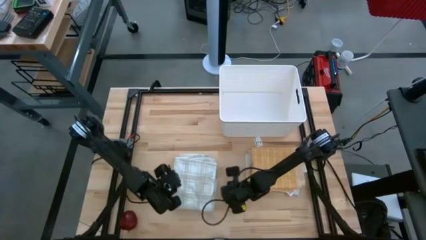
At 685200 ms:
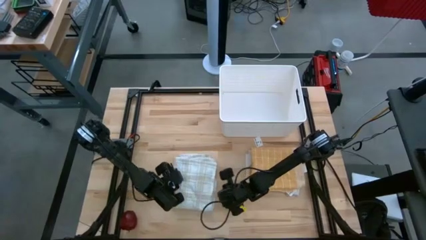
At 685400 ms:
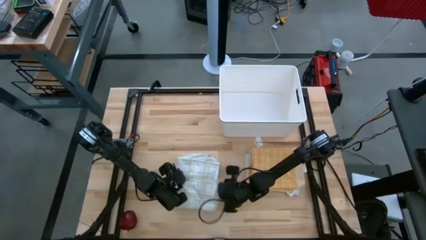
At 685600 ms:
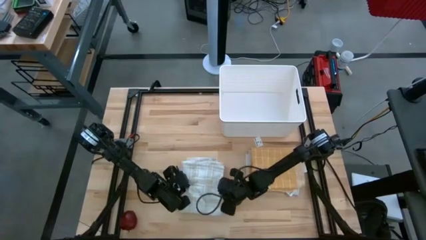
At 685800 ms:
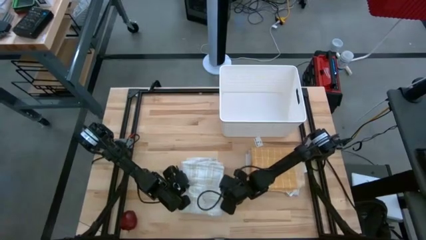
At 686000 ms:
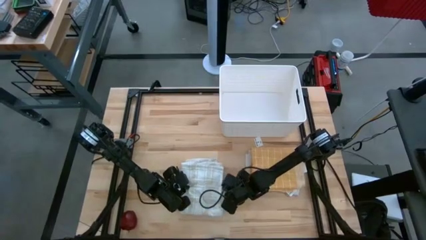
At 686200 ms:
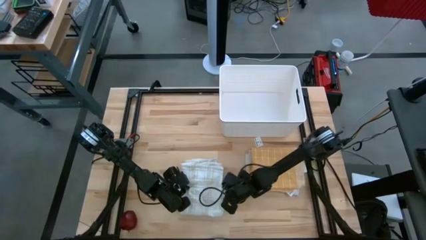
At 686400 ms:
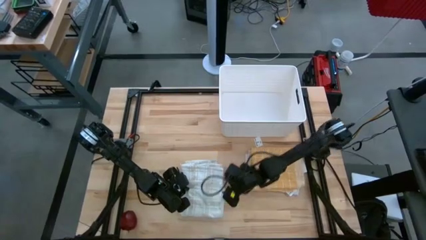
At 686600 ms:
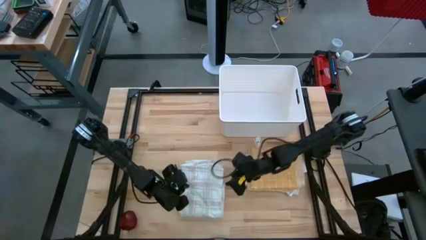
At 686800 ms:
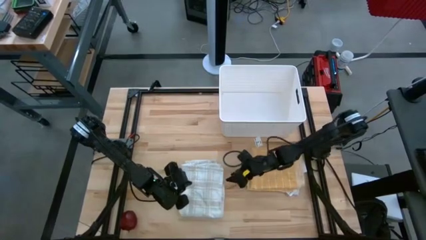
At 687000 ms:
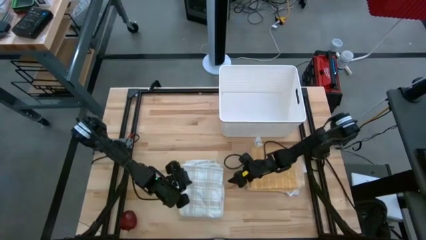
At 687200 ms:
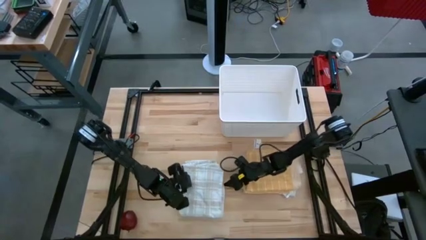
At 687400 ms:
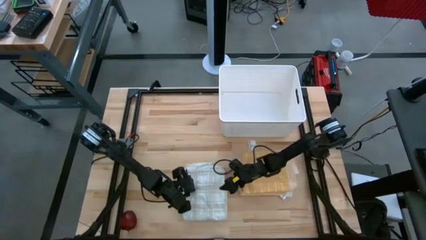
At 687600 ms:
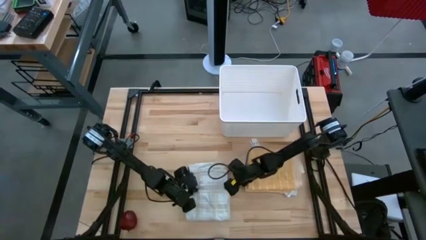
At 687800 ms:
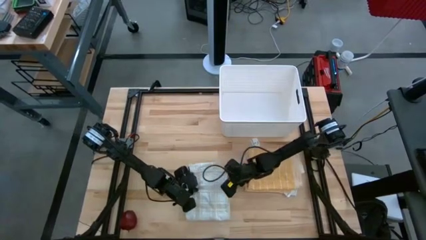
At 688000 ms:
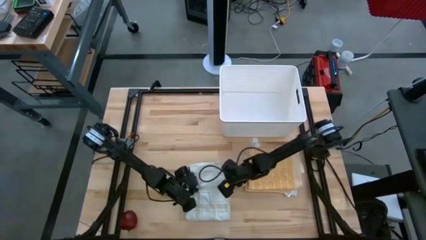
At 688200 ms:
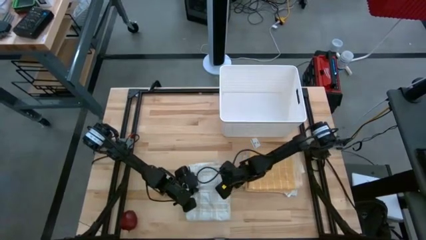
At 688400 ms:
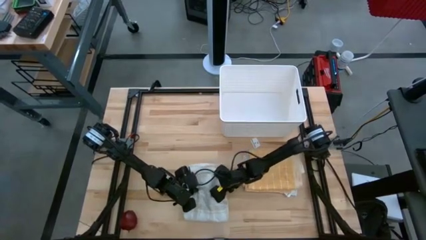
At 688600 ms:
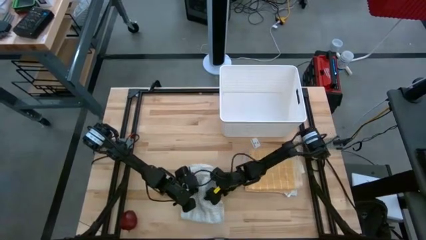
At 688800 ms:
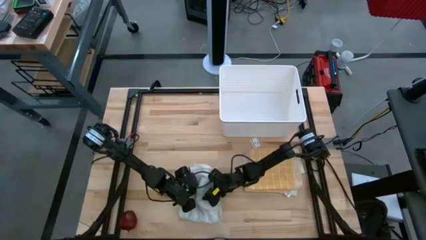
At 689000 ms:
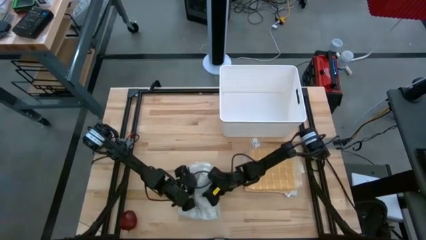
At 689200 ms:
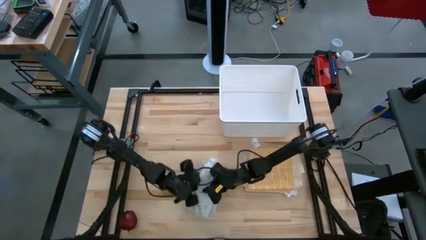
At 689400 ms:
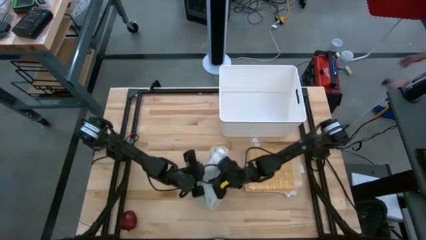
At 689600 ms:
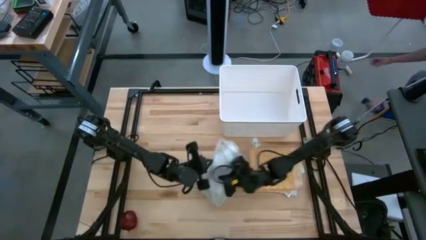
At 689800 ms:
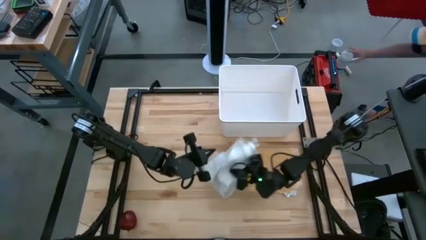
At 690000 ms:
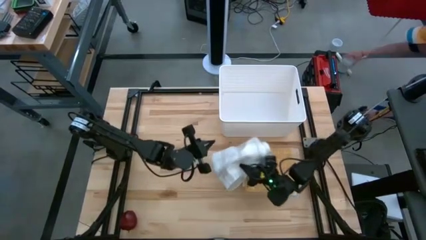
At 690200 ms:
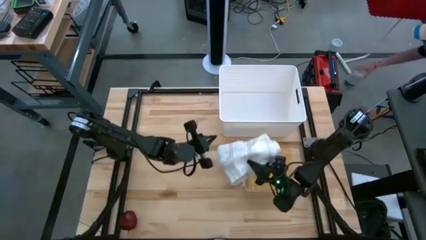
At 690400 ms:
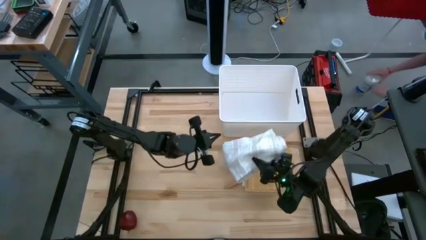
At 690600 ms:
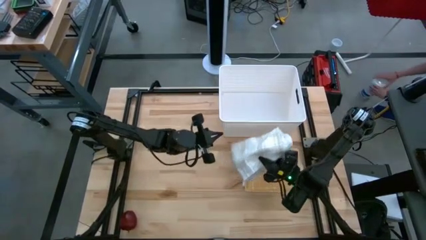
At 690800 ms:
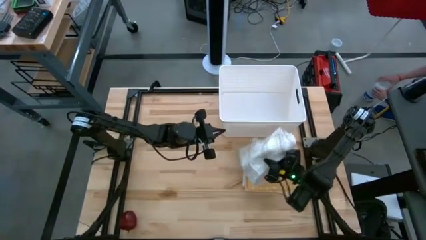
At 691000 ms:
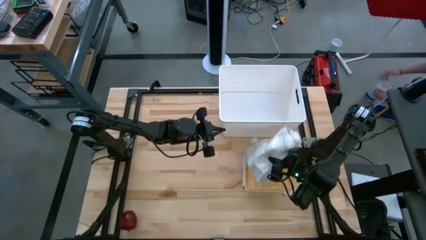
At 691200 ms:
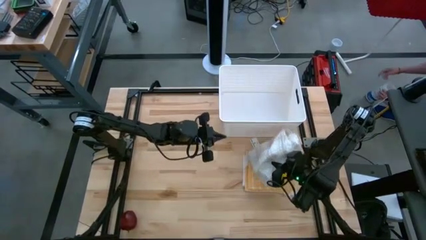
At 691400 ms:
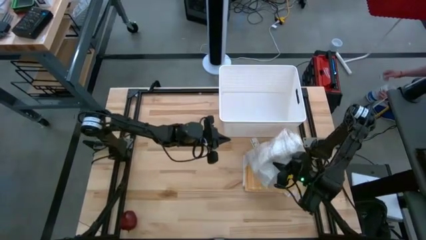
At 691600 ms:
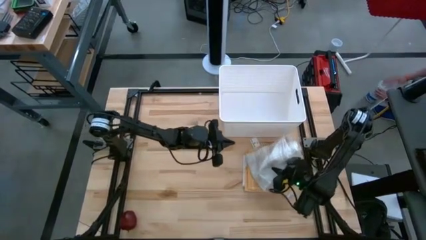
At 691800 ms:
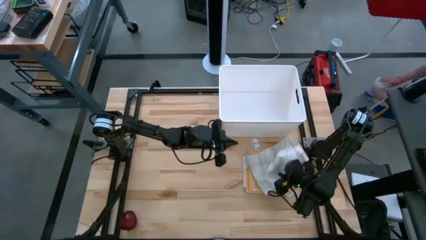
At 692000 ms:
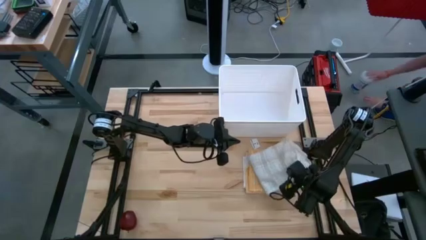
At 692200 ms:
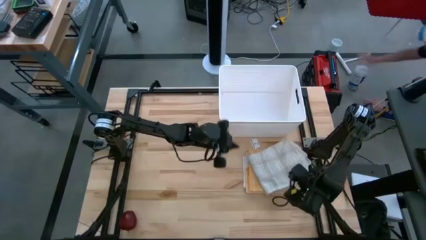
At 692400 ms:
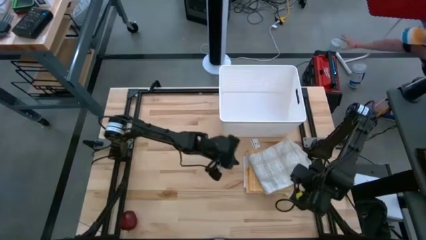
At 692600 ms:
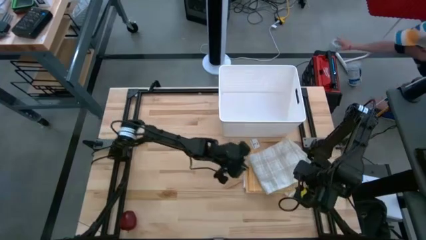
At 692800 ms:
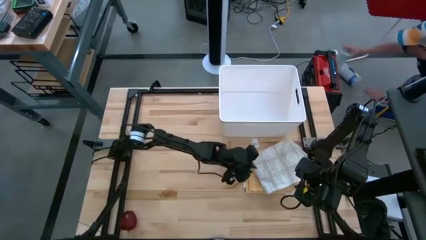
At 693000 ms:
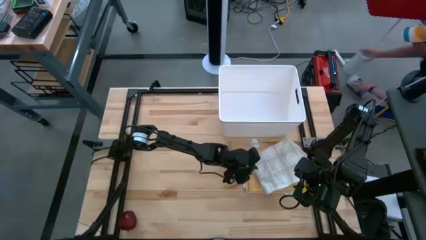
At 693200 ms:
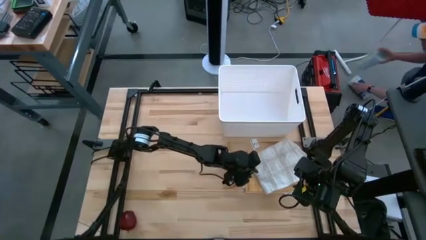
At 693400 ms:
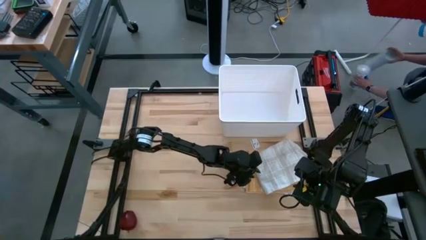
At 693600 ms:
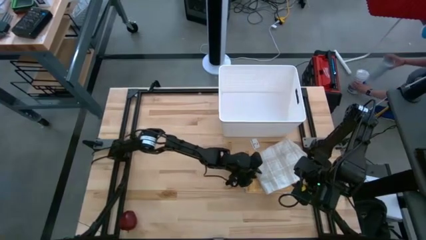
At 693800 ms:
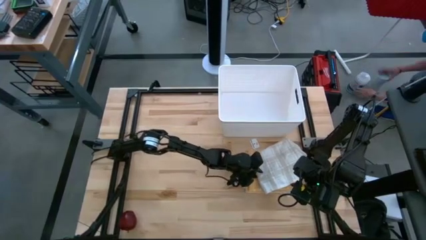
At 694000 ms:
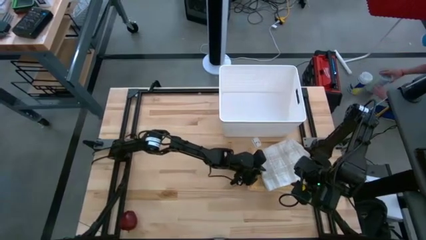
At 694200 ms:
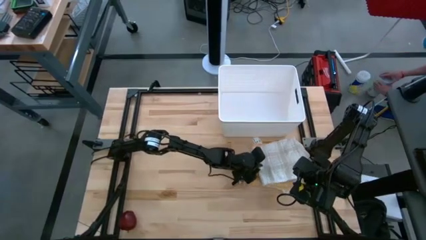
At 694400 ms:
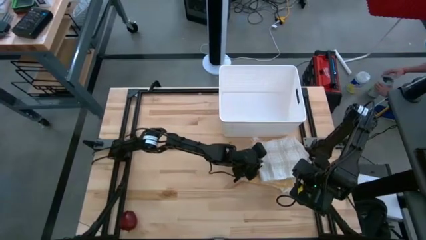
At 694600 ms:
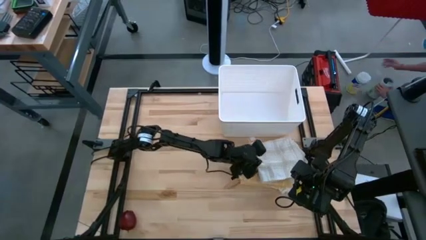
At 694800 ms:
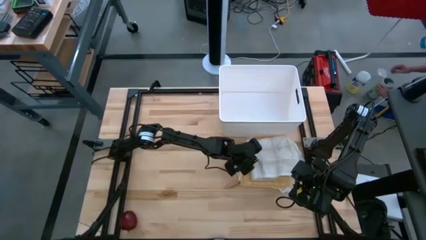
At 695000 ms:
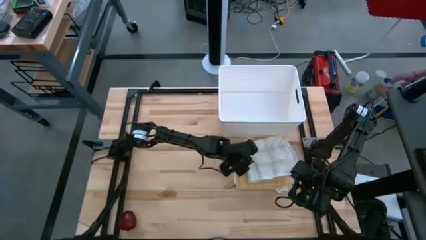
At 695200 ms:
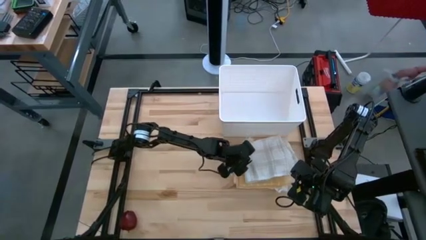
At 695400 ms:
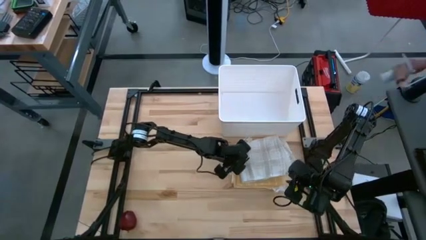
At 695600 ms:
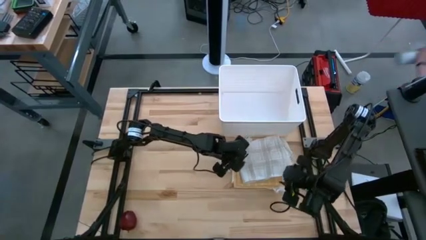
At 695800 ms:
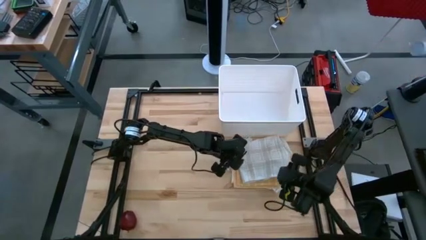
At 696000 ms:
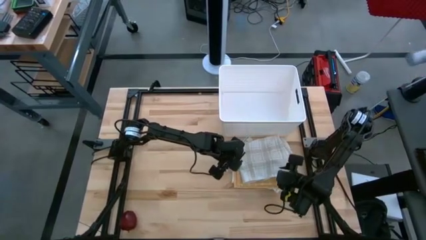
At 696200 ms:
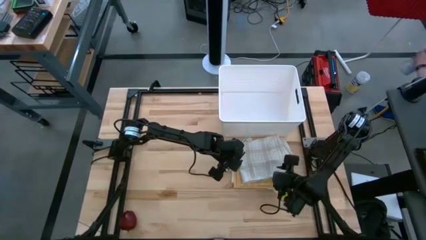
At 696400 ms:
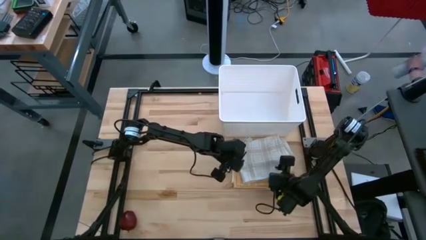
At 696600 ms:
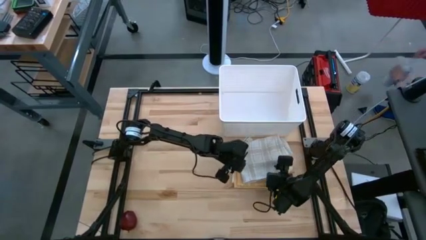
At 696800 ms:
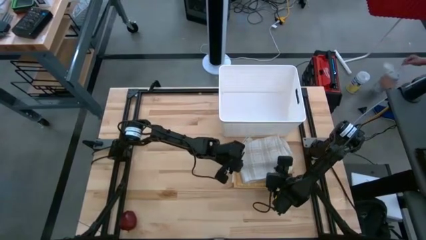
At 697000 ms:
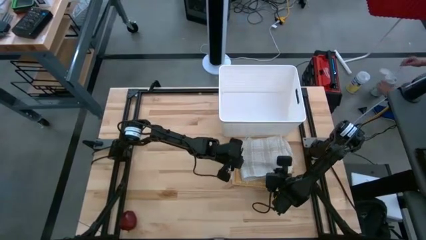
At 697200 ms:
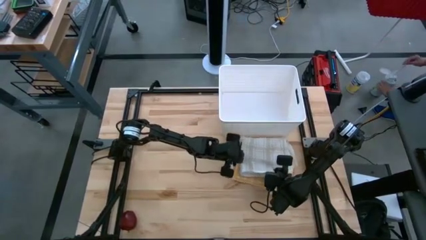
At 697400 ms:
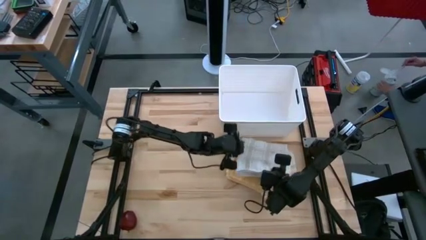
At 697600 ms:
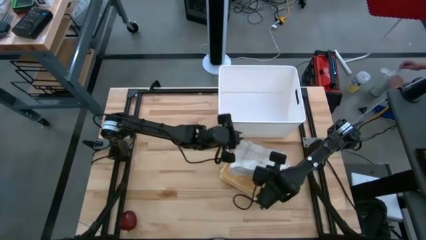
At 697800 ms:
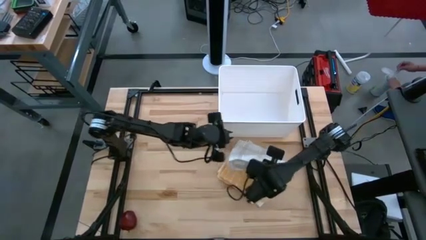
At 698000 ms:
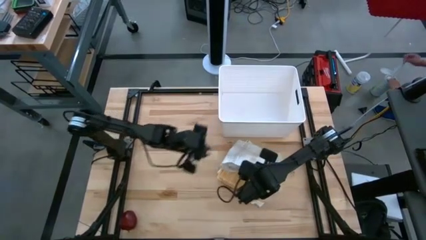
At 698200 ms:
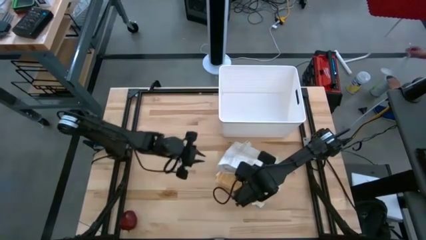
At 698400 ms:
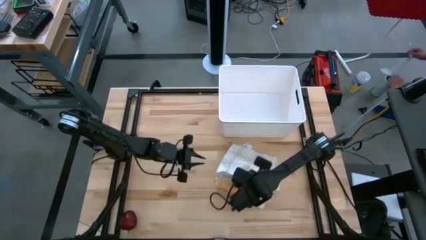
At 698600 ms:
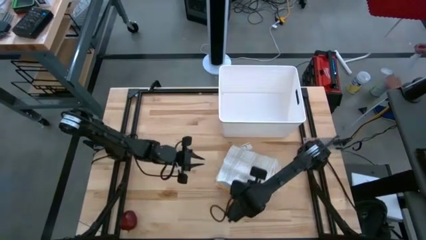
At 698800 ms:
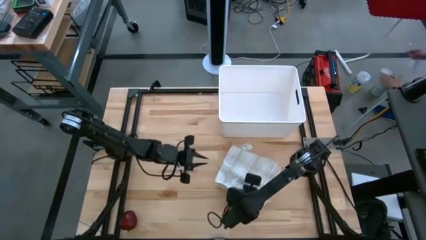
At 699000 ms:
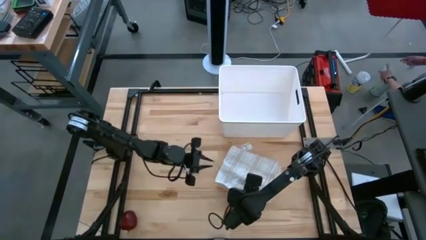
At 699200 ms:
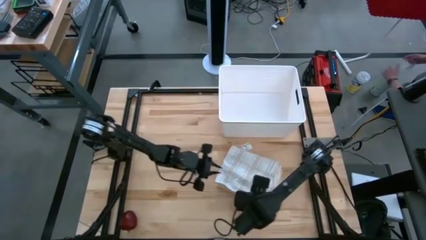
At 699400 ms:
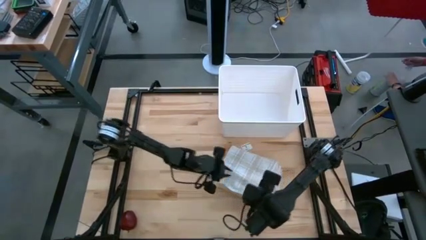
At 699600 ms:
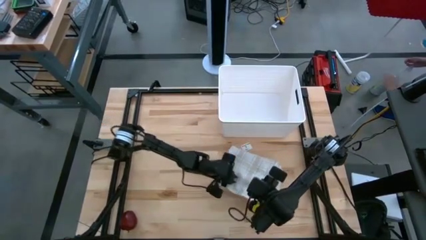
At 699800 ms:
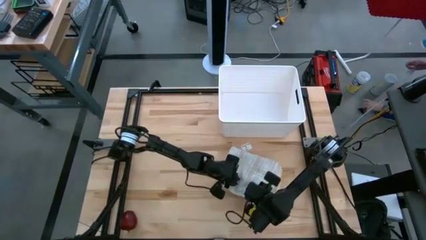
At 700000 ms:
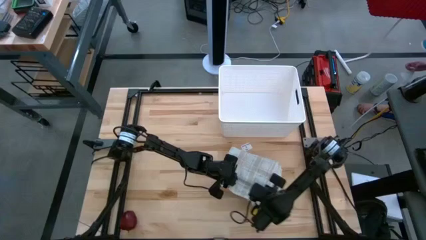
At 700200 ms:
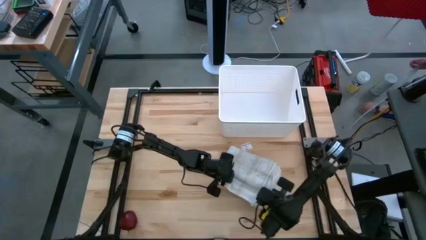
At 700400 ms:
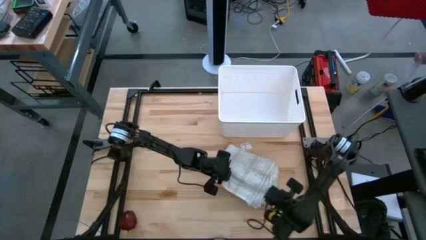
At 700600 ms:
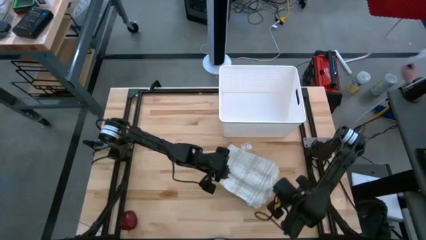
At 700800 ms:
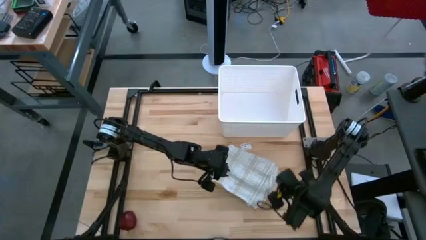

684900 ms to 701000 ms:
Task: Fold towel
Stack the white checkered towel on top of the yellow squared towel
